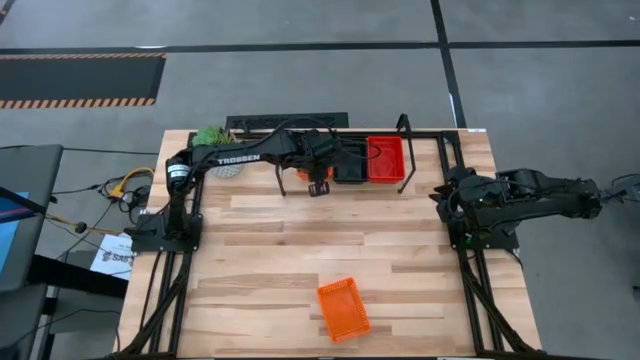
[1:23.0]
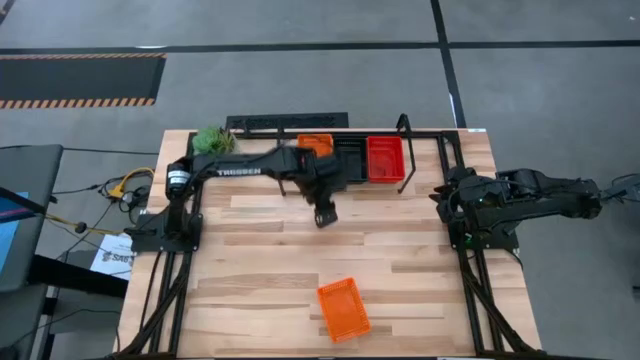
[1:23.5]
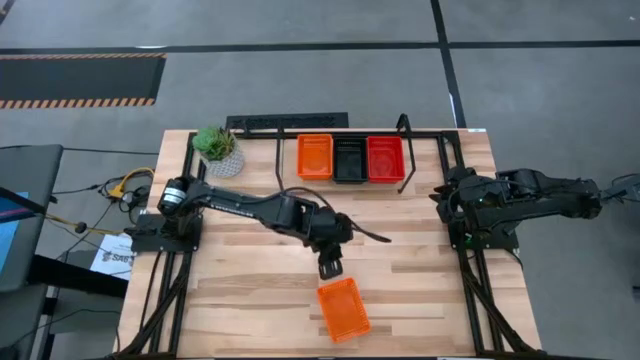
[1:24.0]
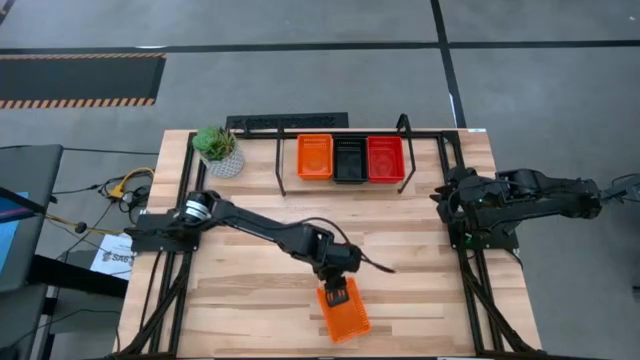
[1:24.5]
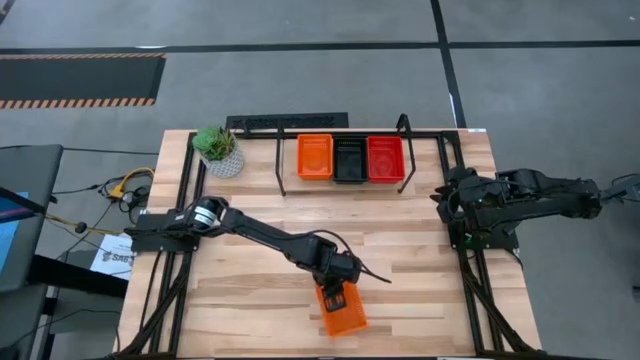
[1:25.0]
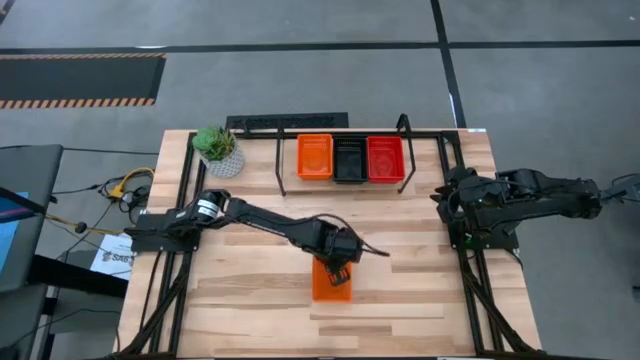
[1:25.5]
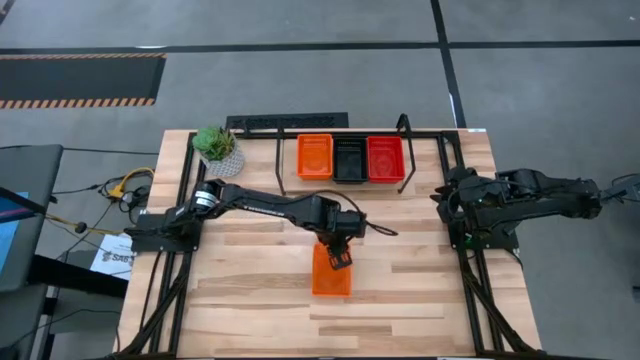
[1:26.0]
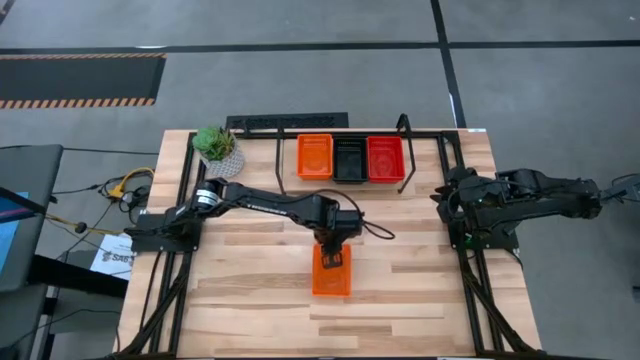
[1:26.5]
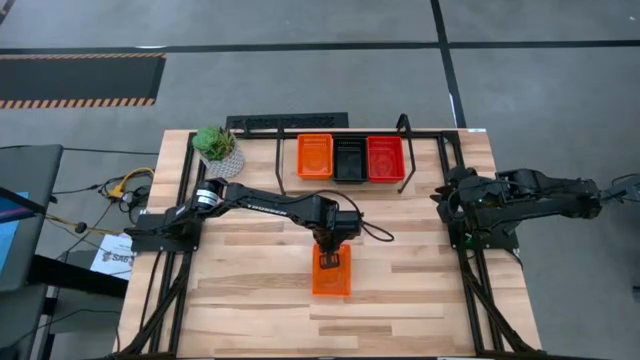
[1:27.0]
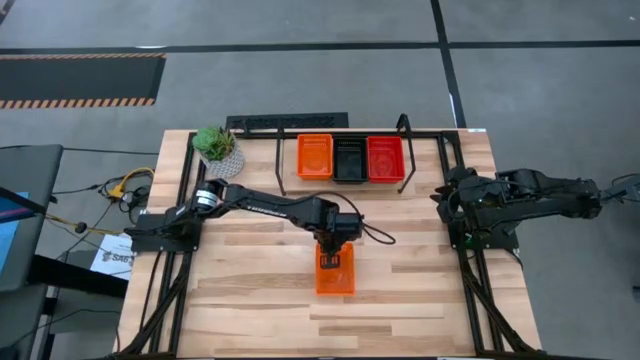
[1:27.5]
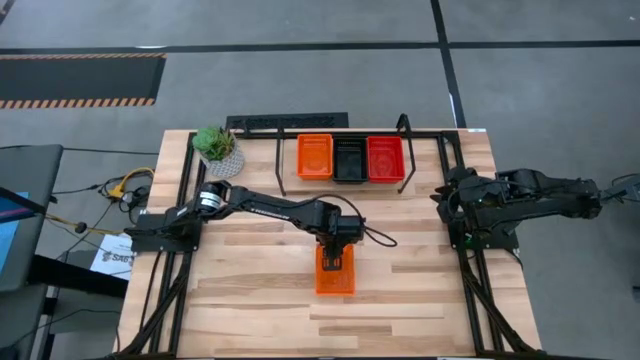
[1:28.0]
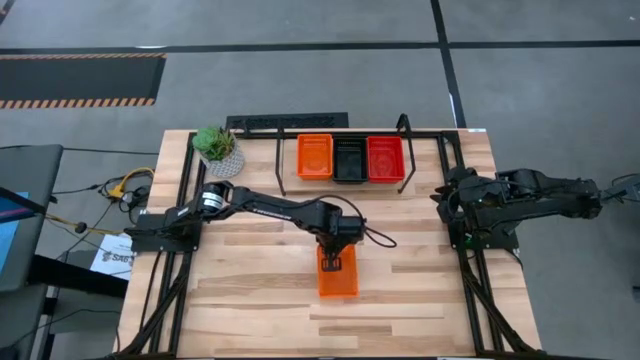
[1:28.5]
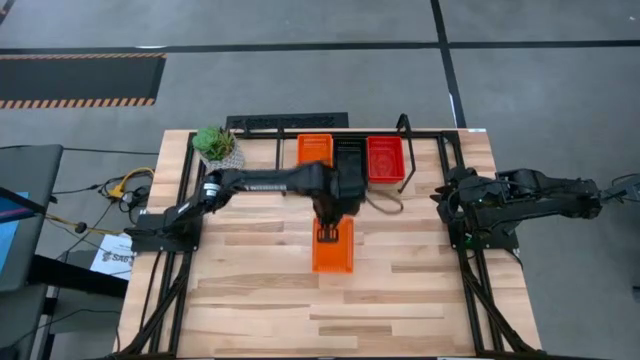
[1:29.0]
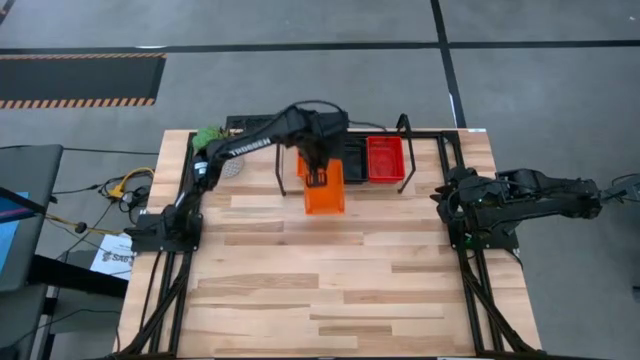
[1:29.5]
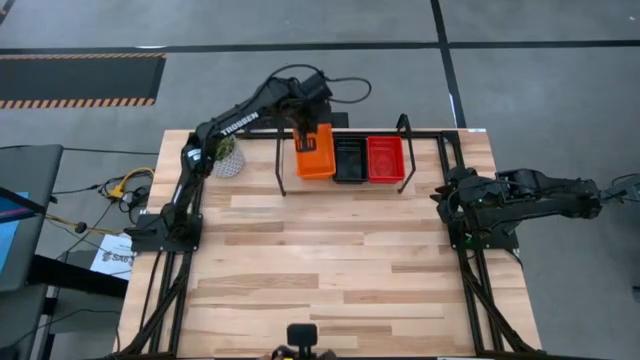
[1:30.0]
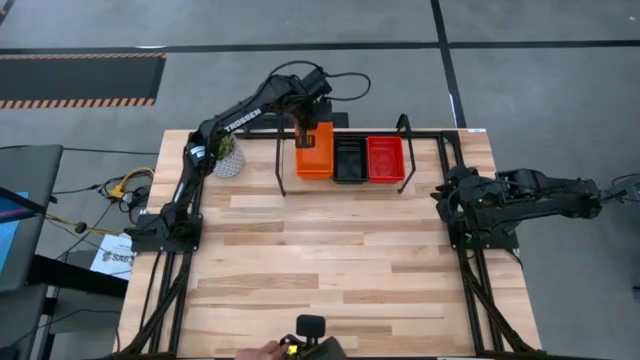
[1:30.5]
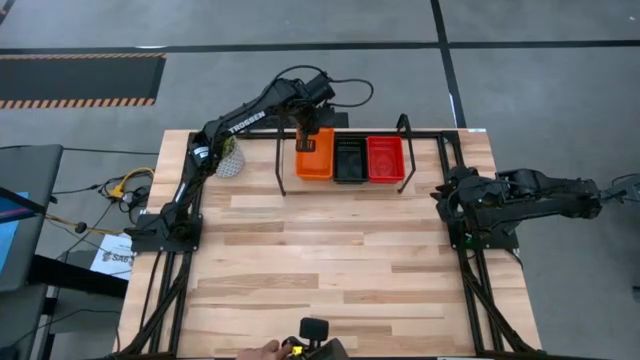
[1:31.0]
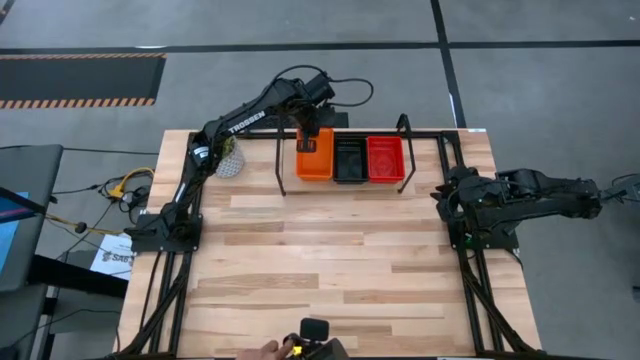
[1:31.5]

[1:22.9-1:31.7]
Task: Stack baskets on shelf by color
Stack the orange bin on top of the orange bins on the shelf

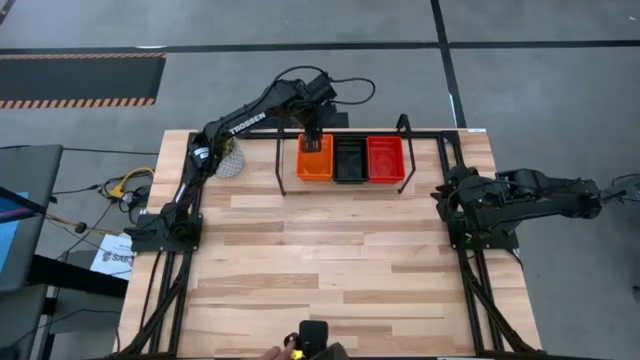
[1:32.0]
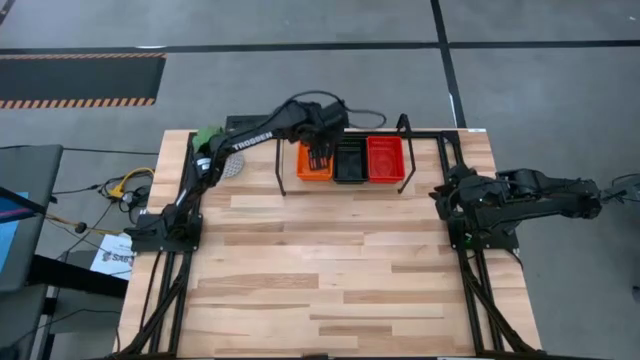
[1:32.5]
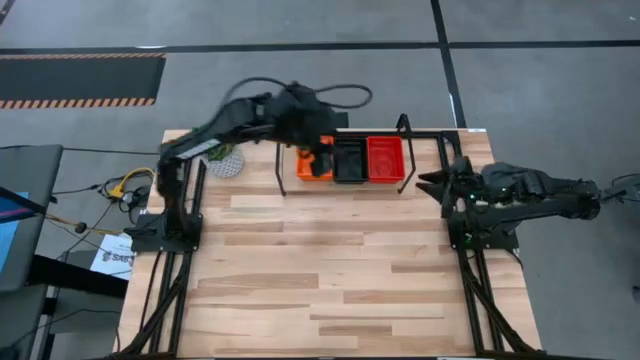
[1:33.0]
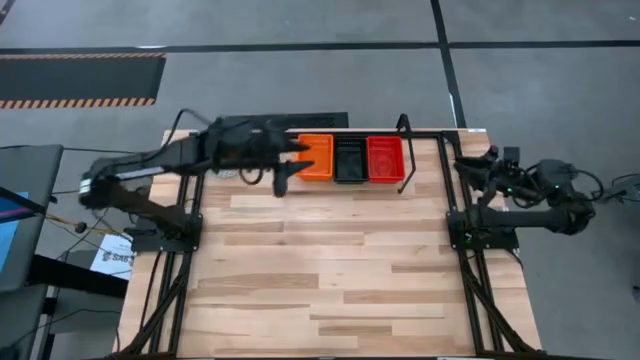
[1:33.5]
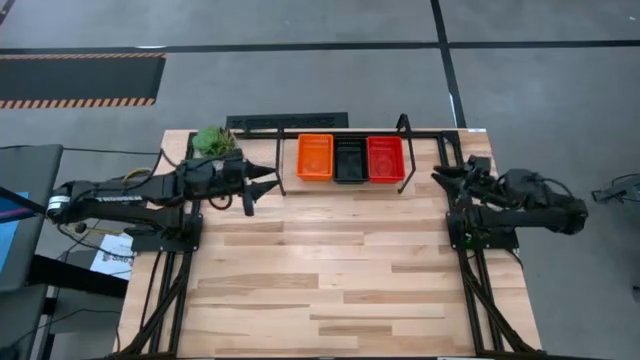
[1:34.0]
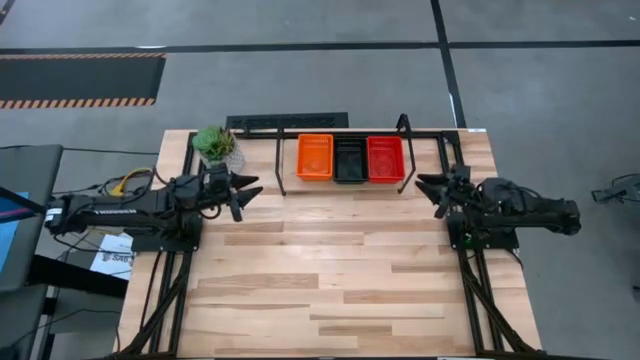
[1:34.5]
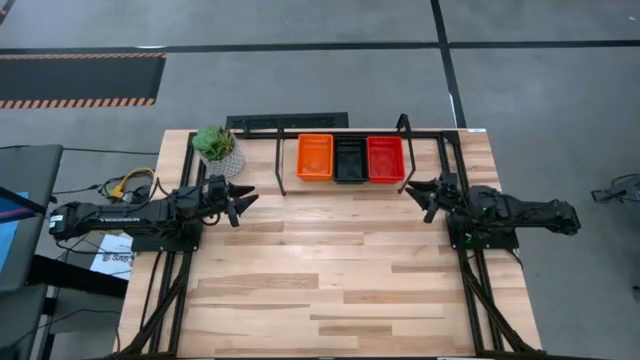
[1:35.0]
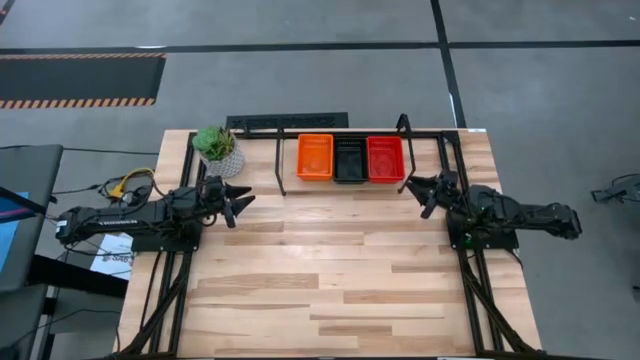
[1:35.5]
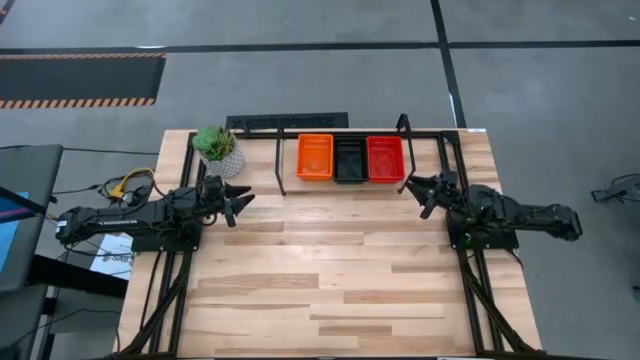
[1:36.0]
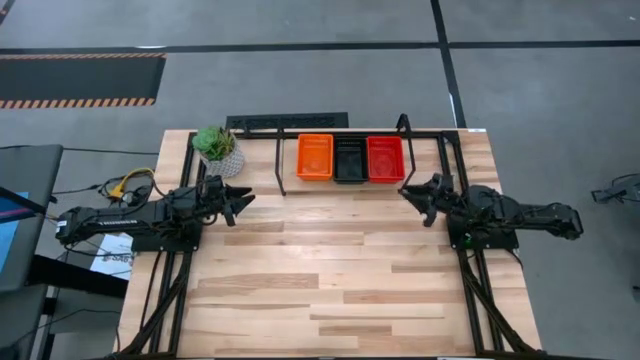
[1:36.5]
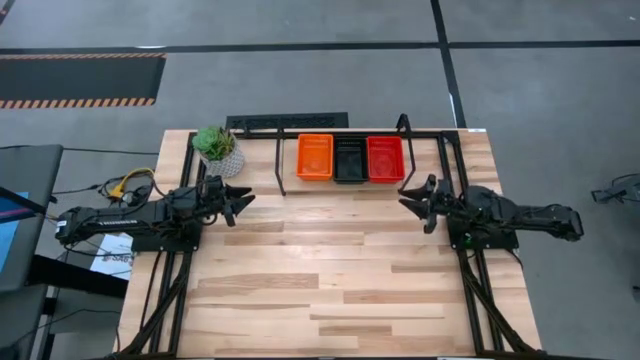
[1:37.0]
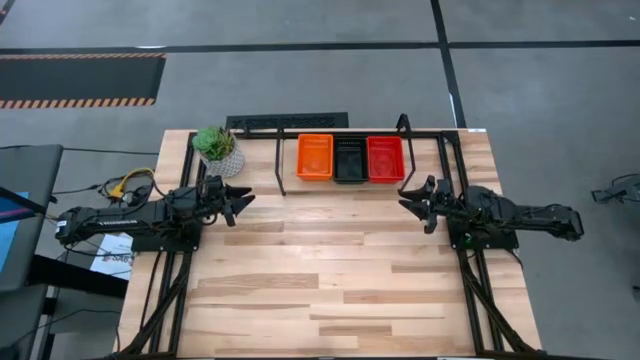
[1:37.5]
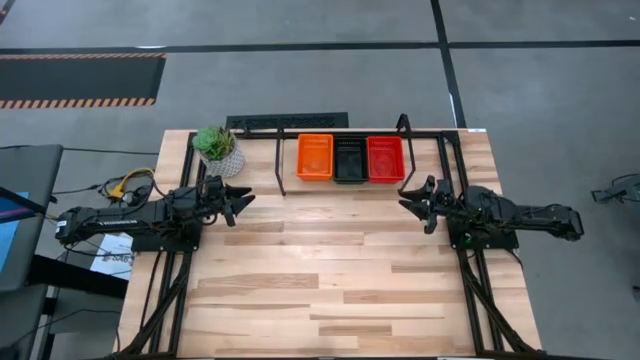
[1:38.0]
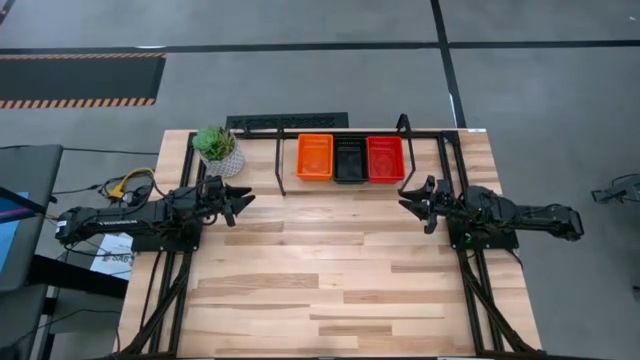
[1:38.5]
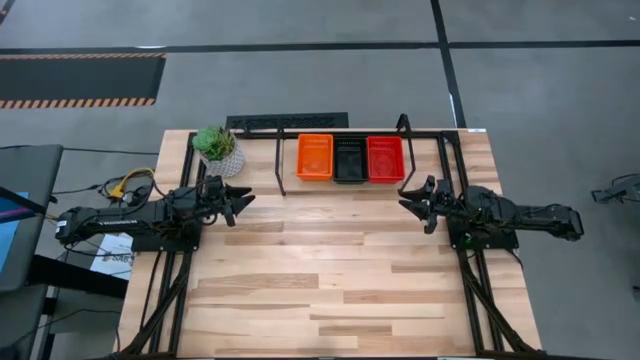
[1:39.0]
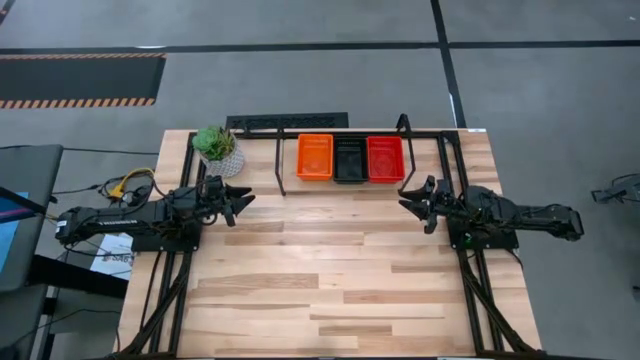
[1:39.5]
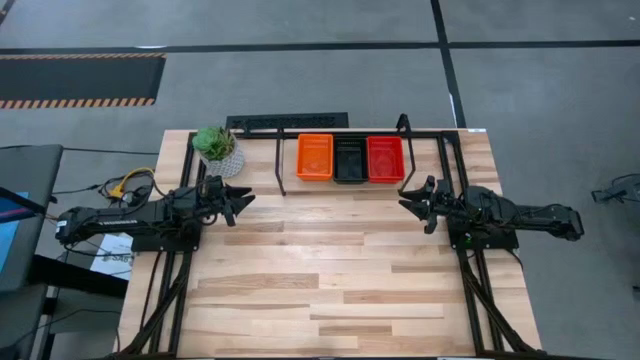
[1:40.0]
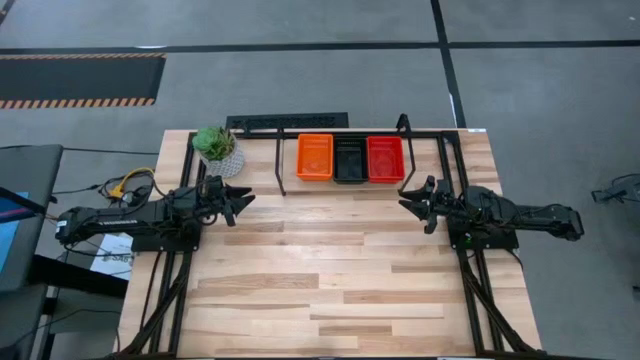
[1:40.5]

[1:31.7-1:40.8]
Return to Home Position

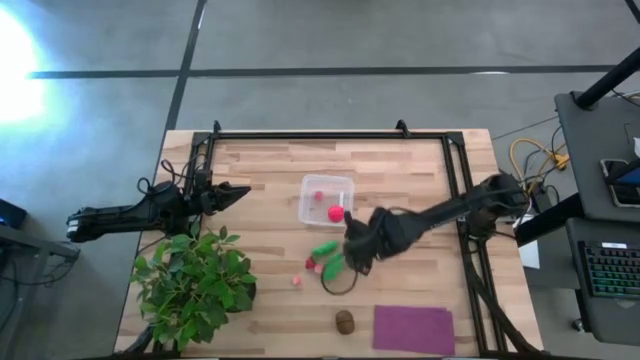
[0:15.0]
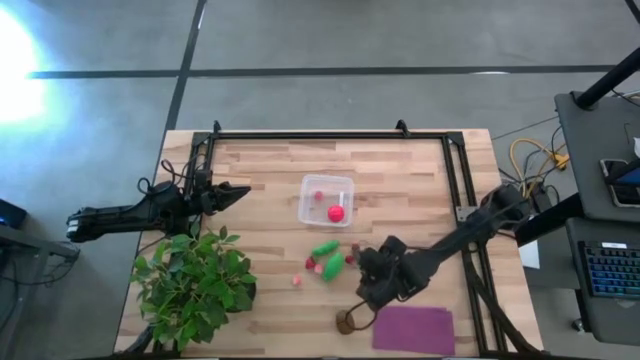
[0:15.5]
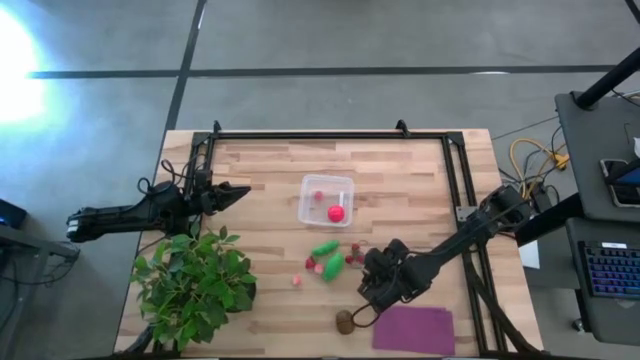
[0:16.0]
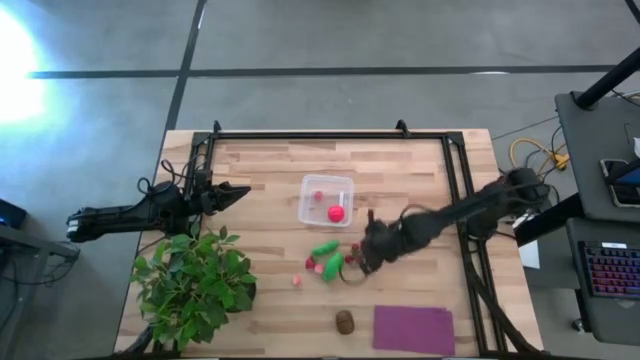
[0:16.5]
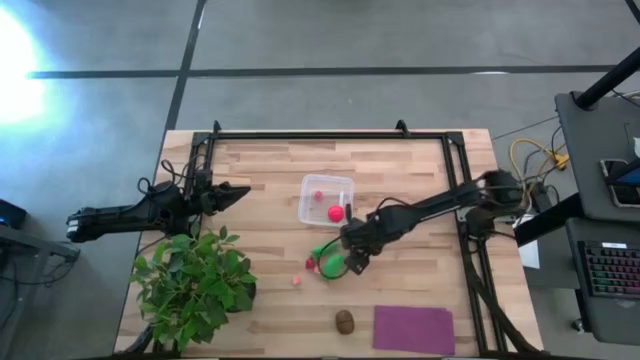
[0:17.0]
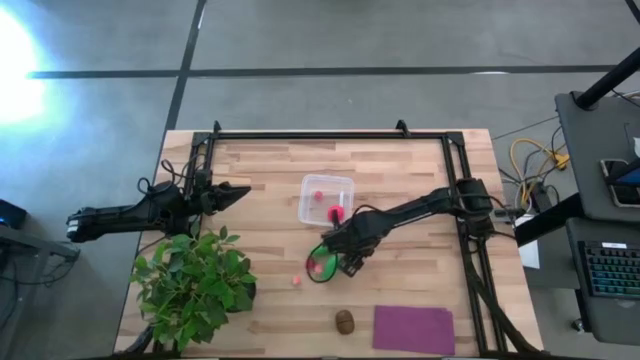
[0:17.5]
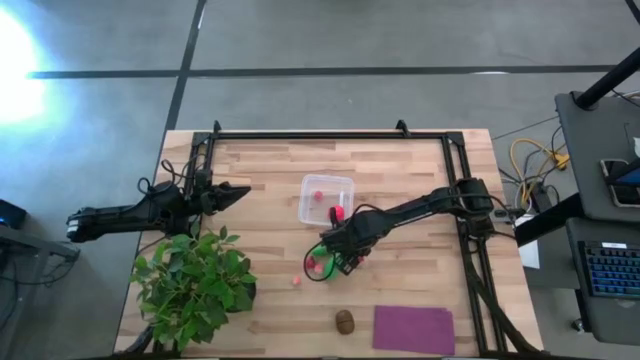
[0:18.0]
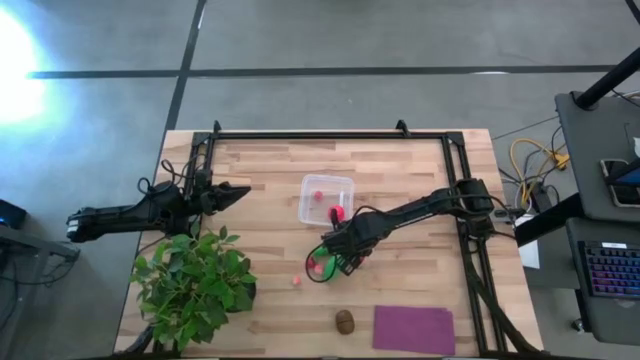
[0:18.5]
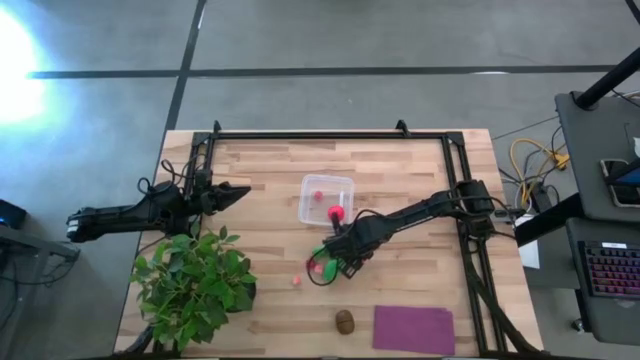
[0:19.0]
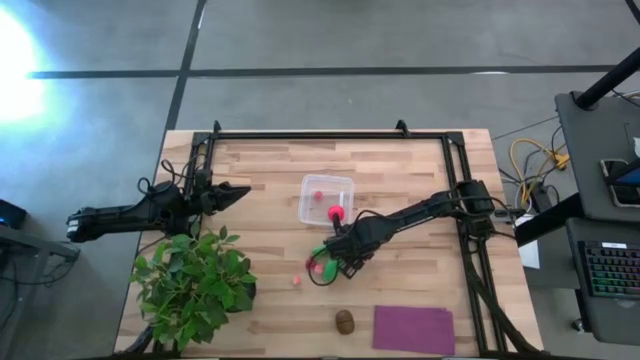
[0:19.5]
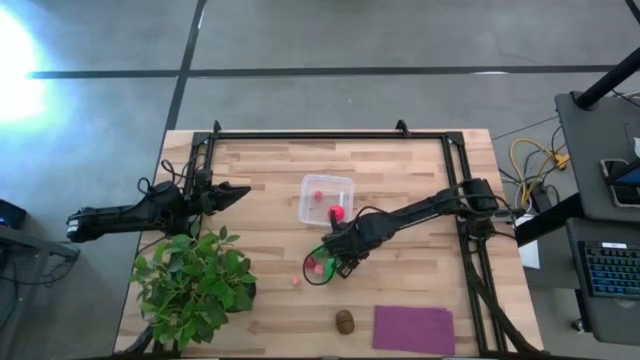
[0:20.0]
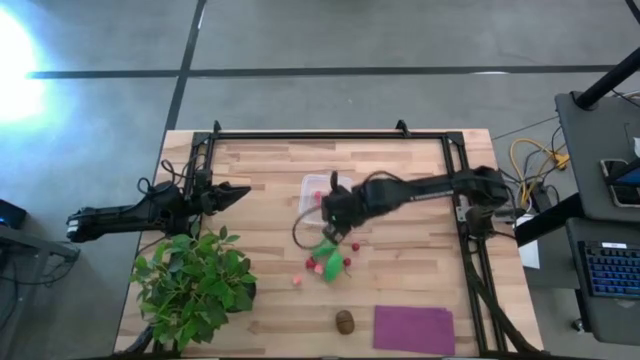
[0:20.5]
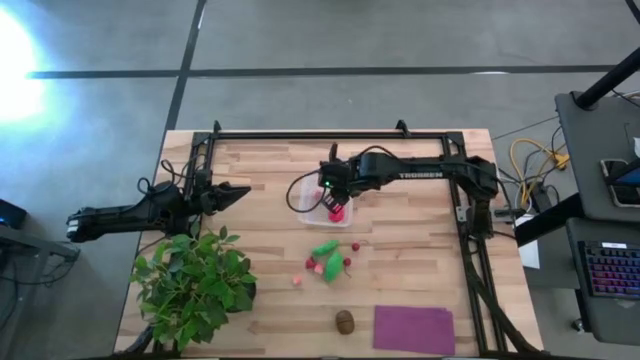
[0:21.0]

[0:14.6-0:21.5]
Task: Pick and placing Produce into tupperware
Put the right strawberry into the transparent bin
